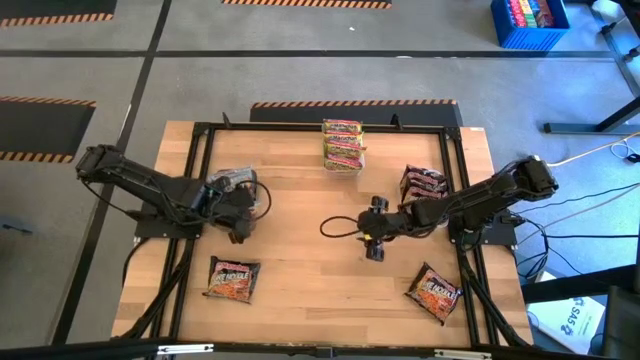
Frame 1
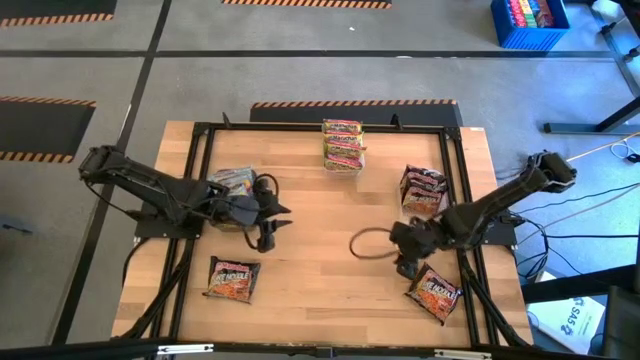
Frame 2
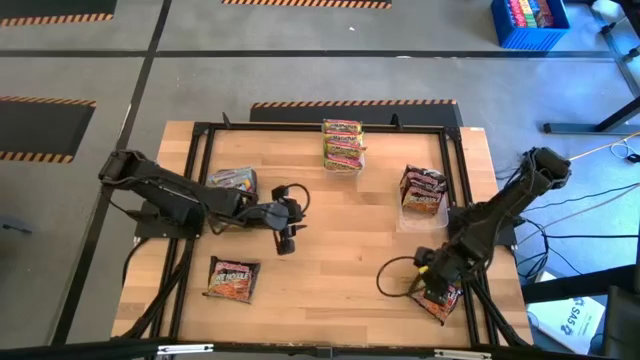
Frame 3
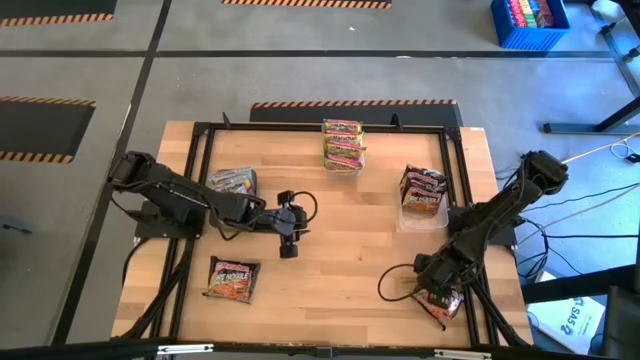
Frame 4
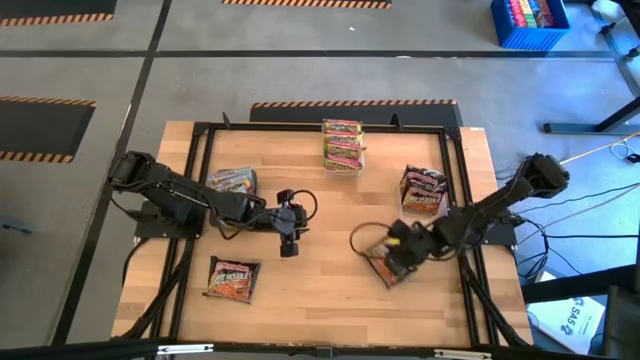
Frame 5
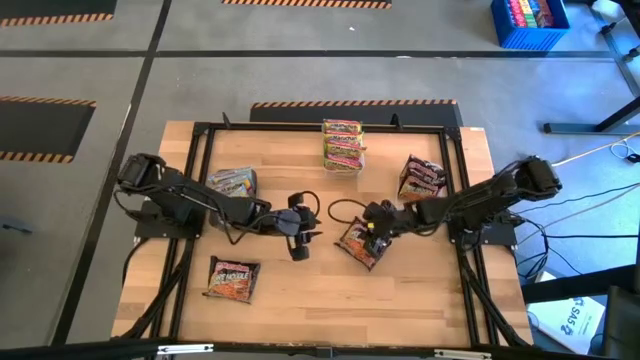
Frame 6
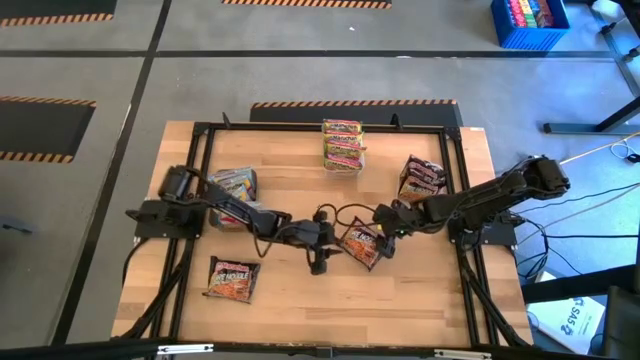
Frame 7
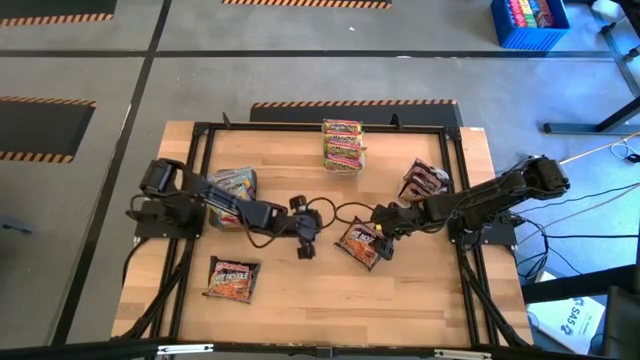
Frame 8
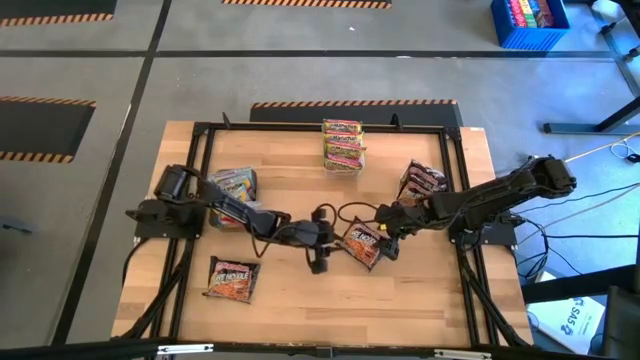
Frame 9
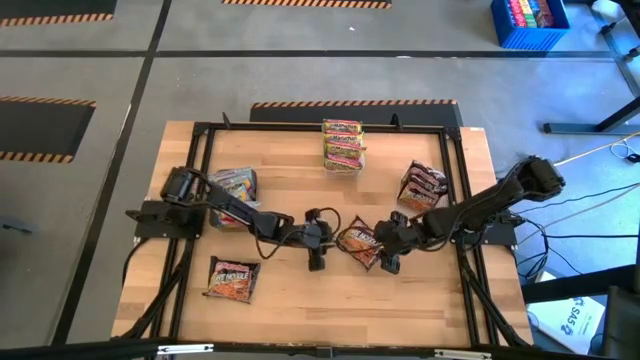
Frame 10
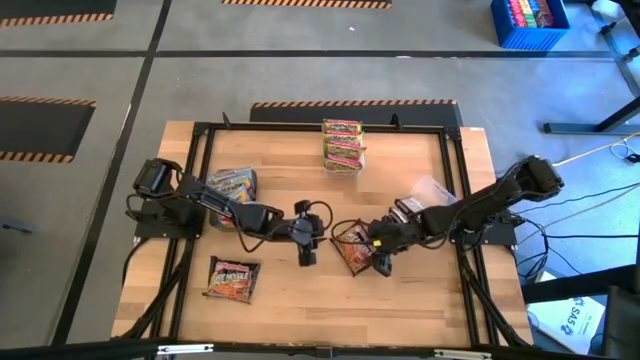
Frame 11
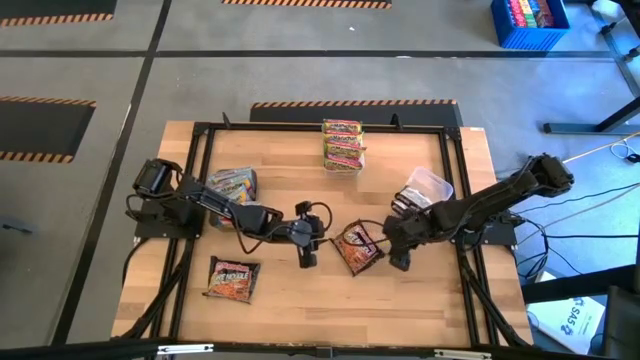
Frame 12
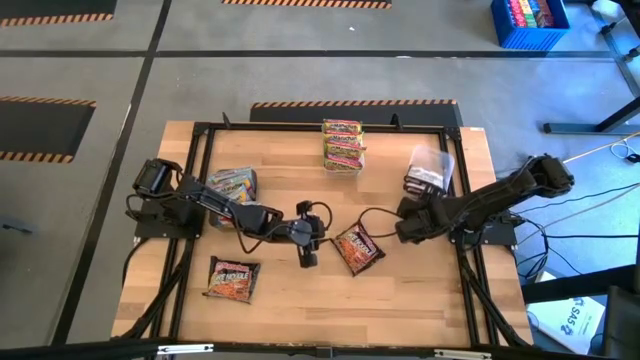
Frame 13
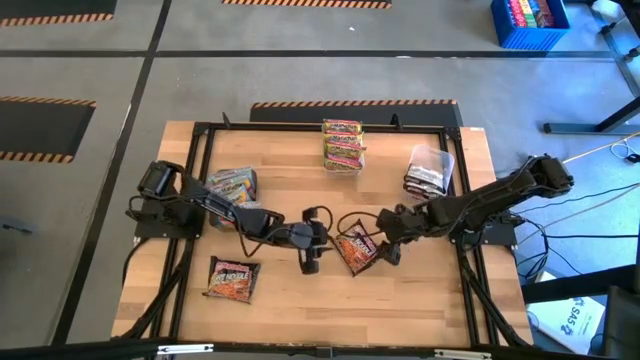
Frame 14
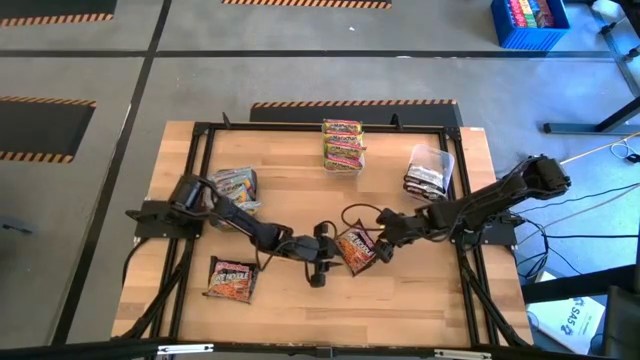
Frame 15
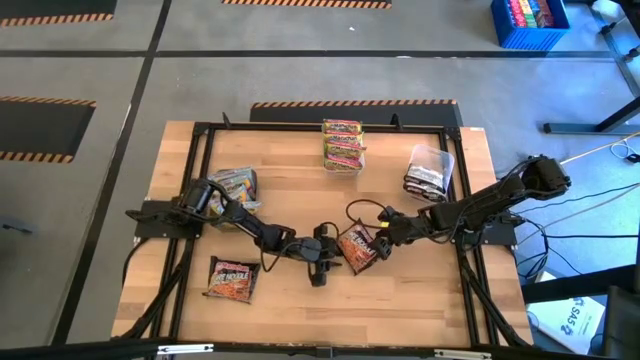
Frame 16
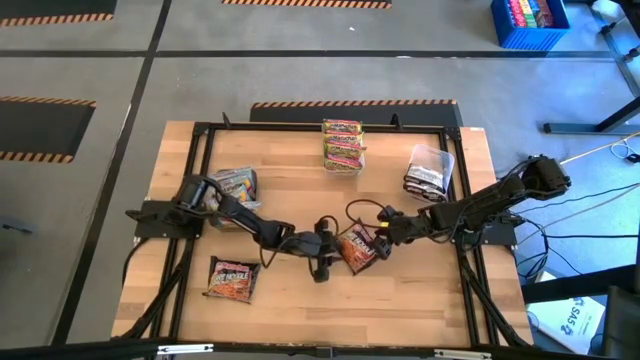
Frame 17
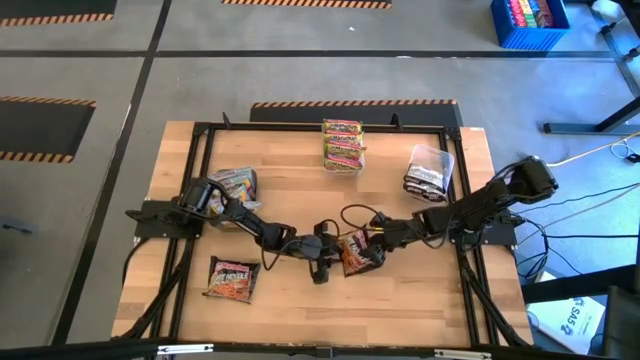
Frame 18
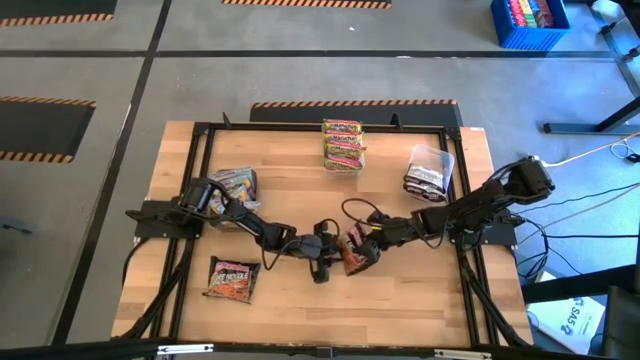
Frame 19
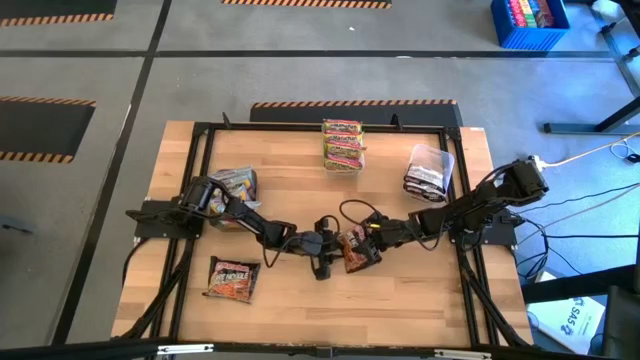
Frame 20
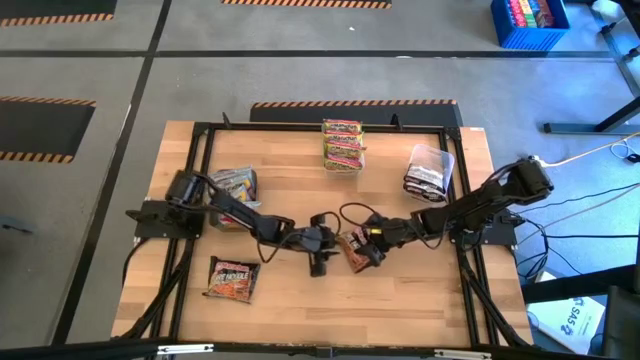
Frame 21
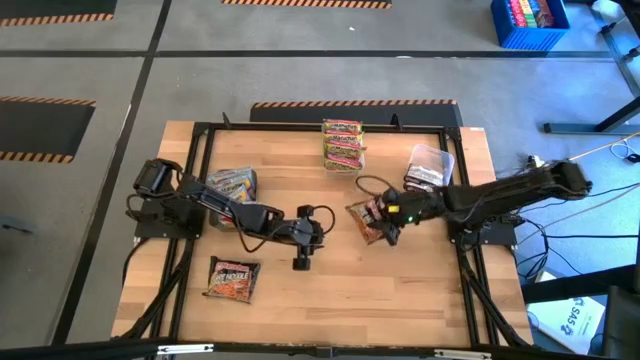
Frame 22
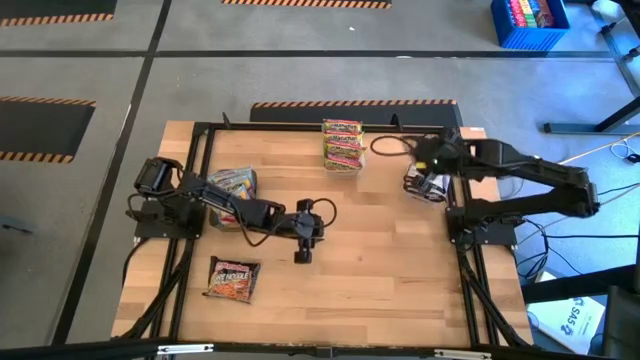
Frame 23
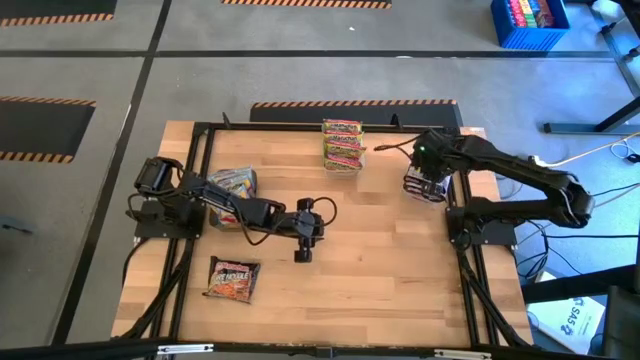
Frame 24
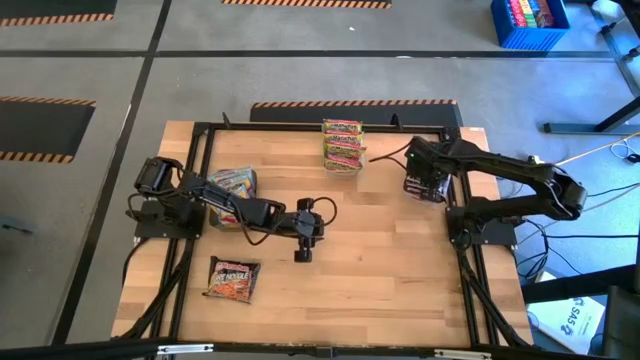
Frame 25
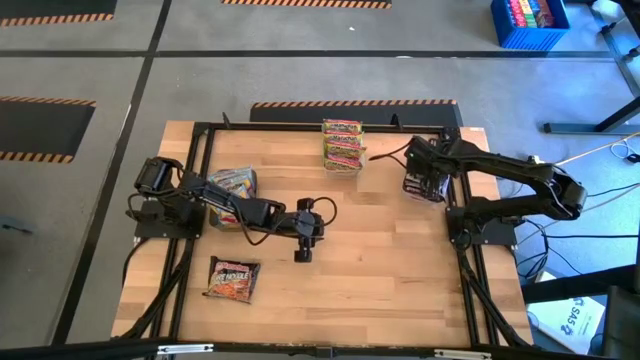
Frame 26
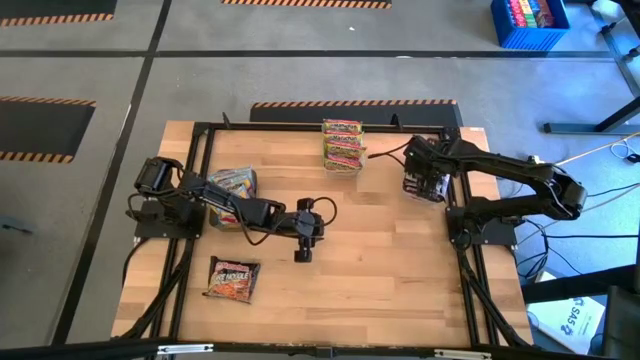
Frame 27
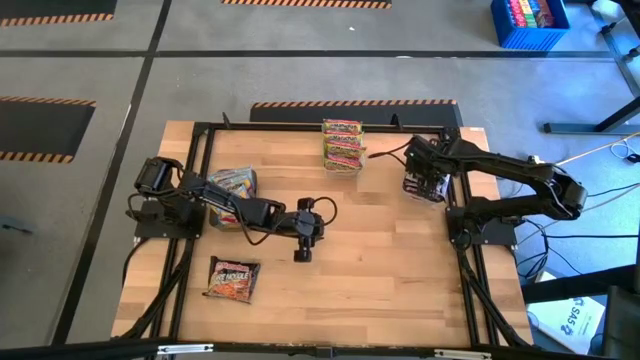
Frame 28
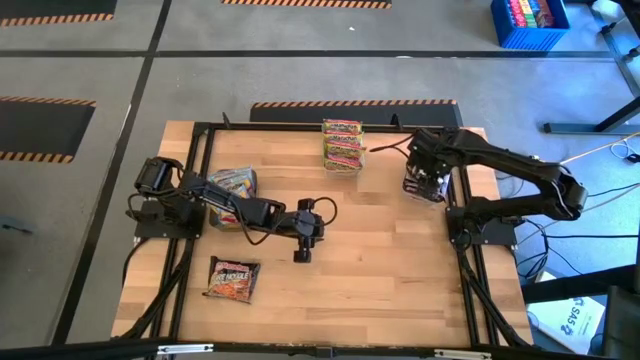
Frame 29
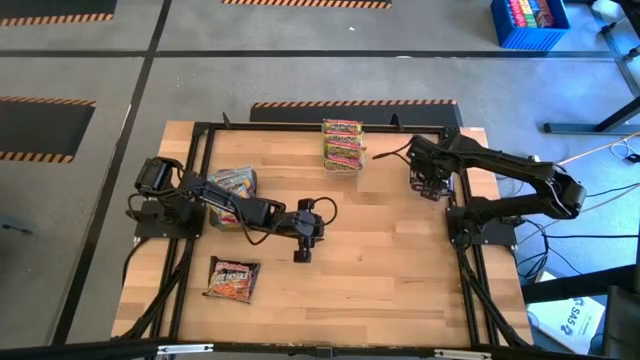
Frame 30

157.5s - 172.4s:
Task: Sort Maruchan noodles
Put the right black noodle pack into the bottom transparent bin

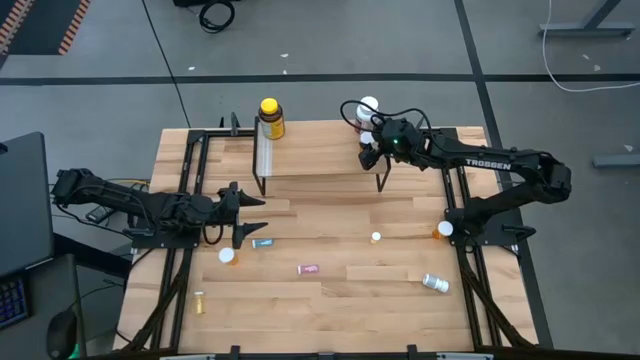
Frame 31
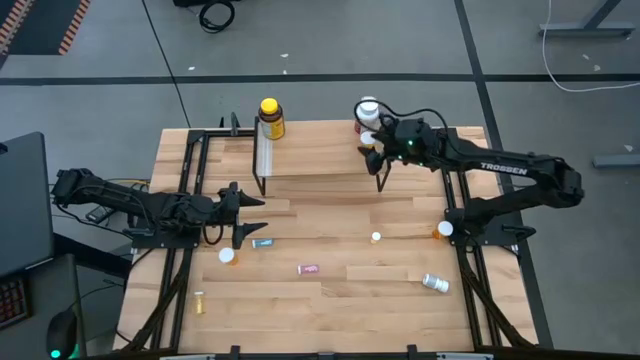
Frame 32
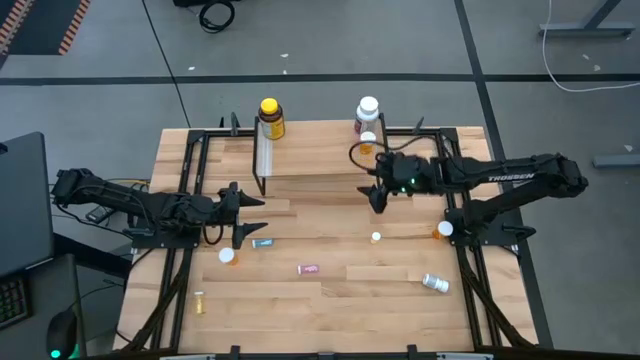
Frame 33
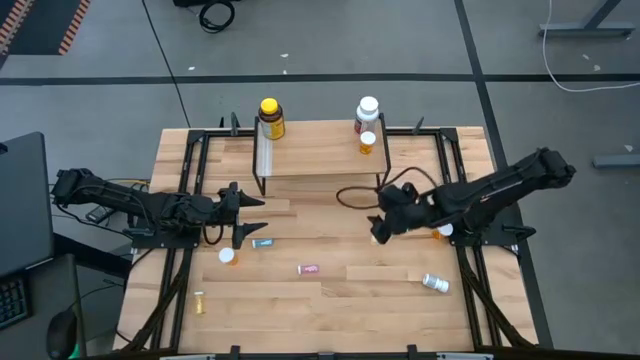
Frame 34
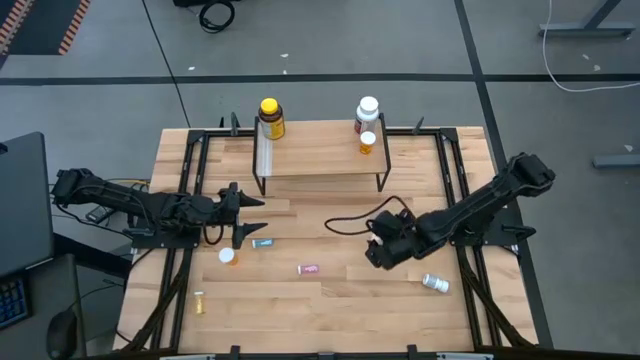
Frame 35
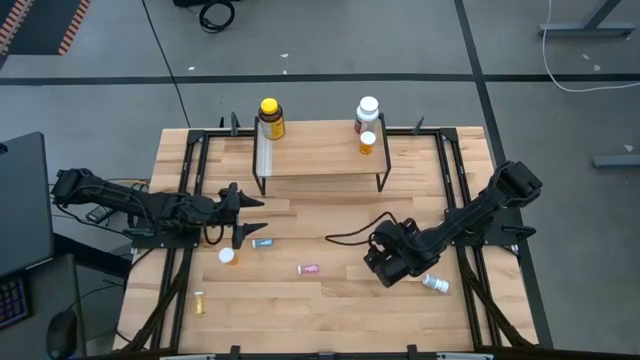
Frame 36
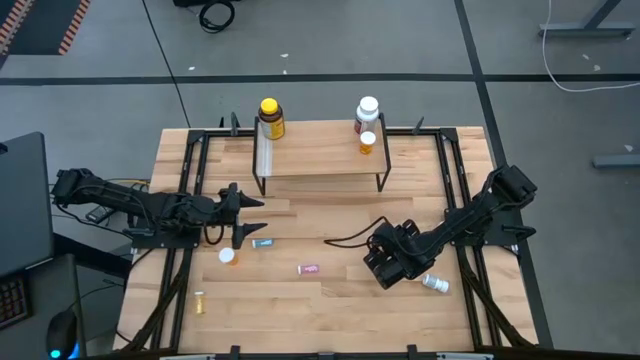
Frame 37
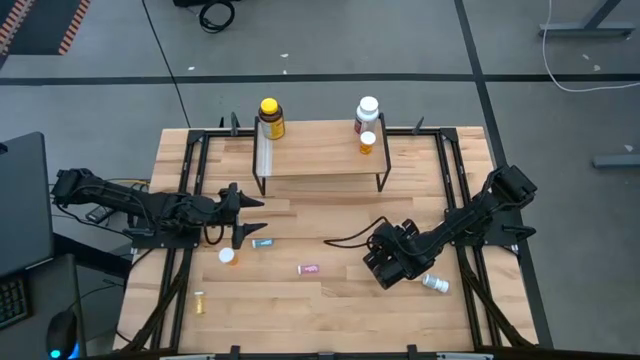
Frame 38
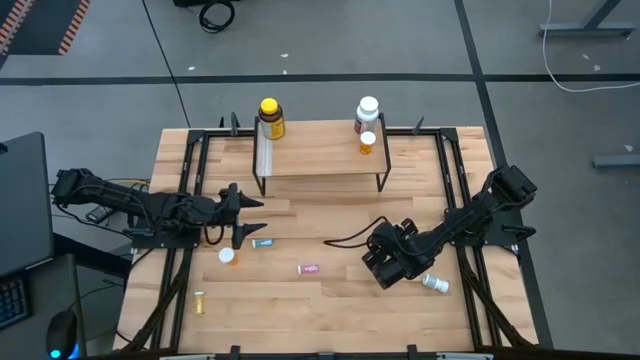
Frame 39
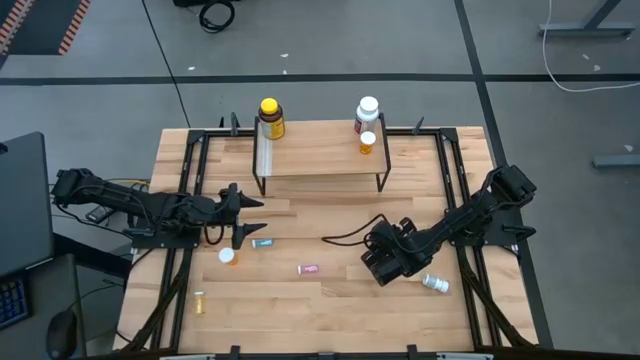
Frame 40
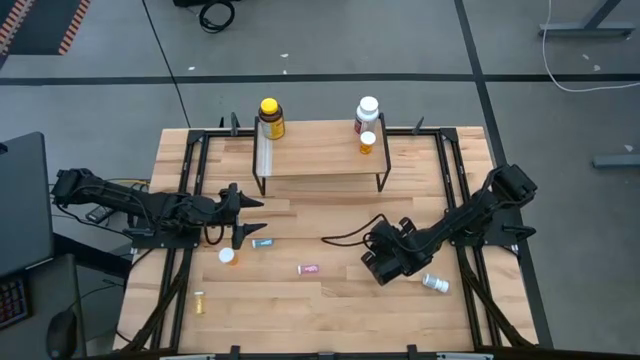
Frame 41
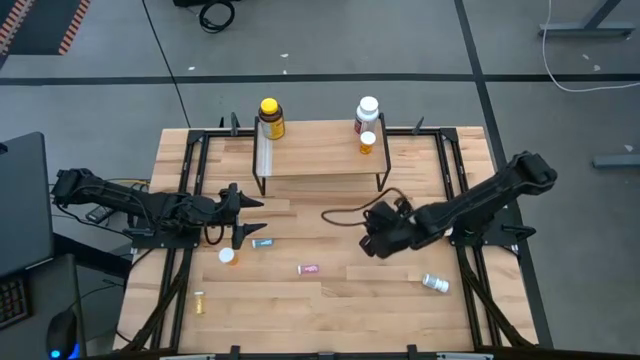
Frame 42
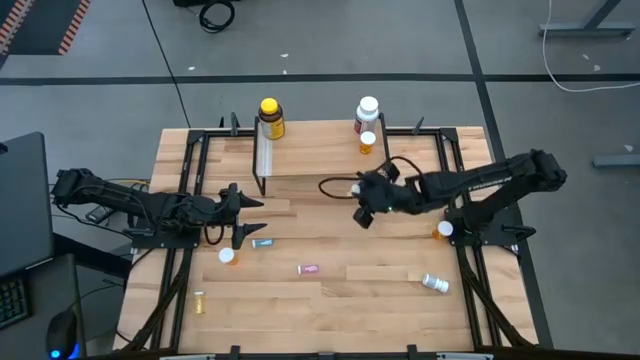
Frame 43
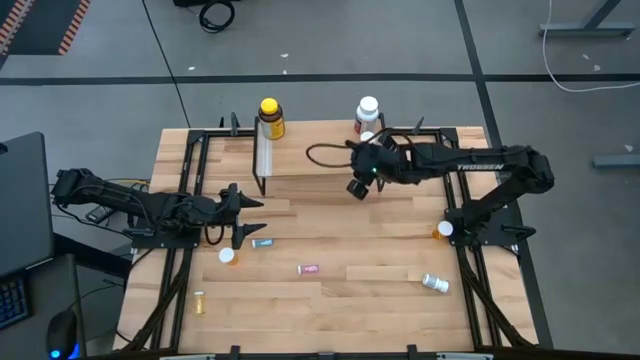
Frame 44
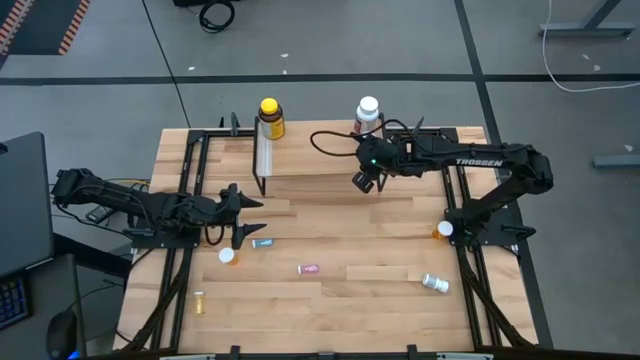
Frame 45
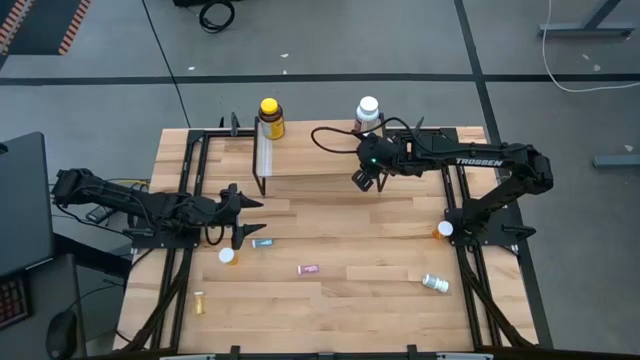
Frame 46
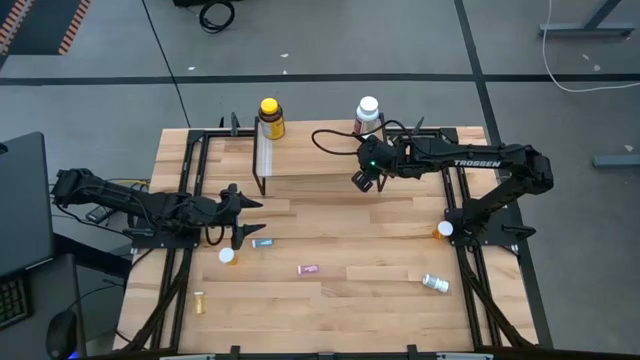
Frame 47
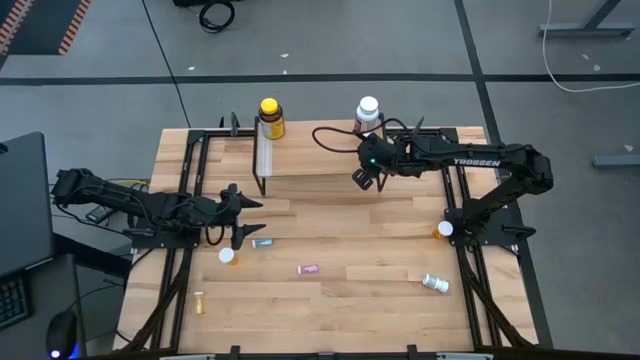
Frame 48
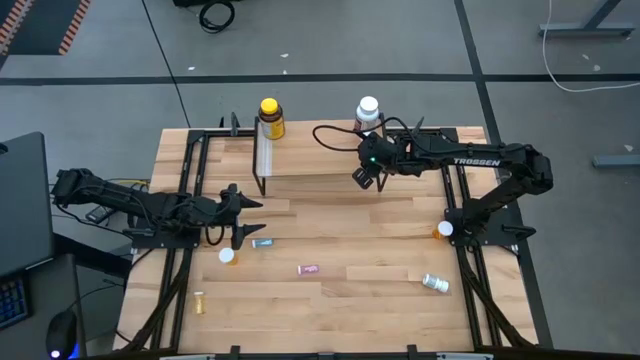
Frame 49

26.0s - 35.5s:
Task: Pick and place medicine bottles onto shelf by color
Put the right small yellow pill bottle on the shelf
